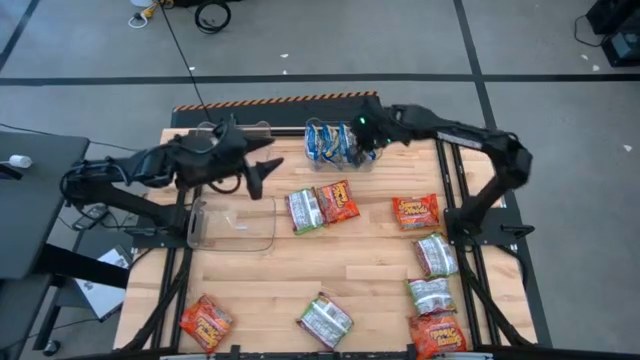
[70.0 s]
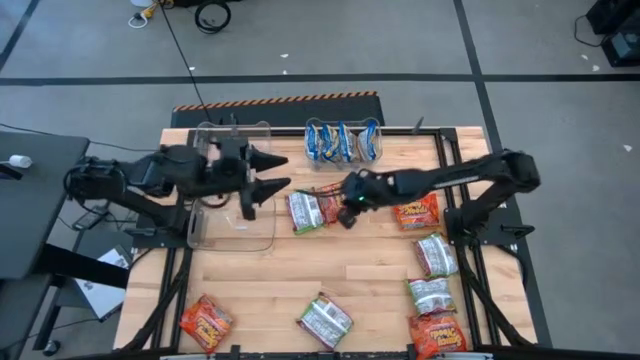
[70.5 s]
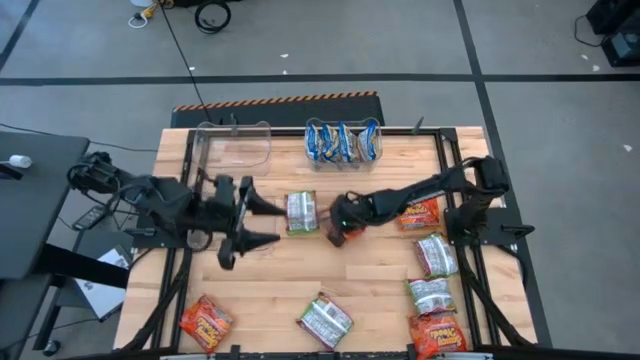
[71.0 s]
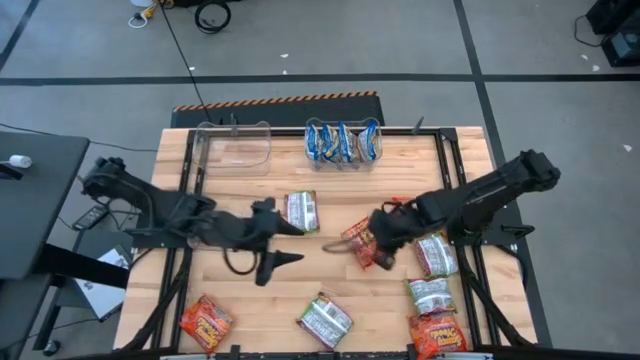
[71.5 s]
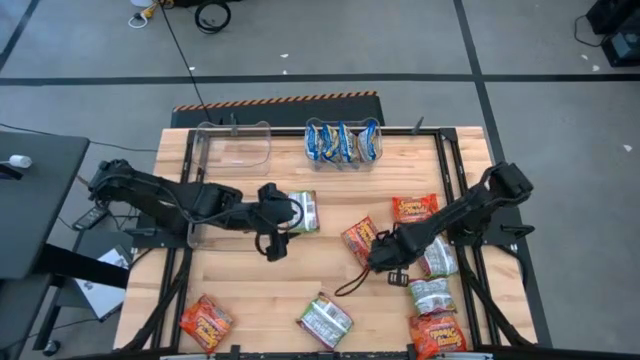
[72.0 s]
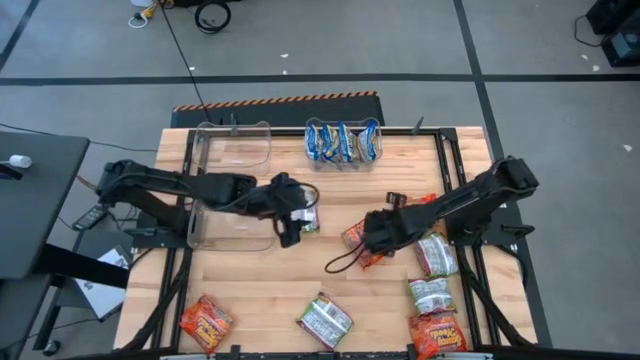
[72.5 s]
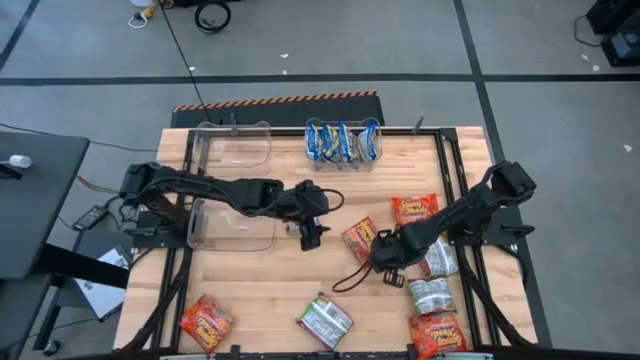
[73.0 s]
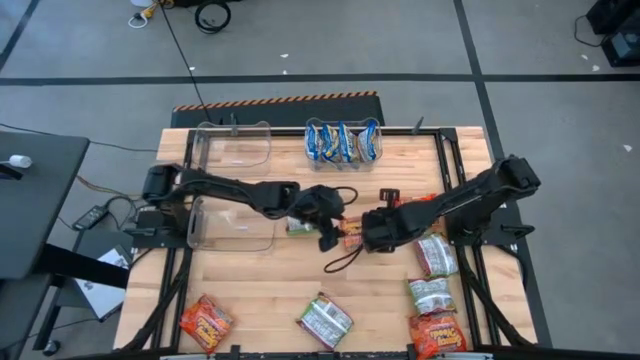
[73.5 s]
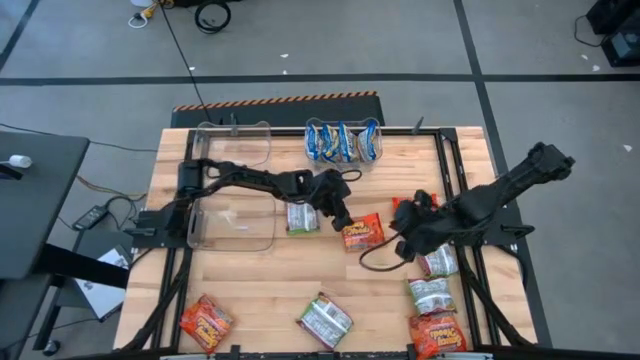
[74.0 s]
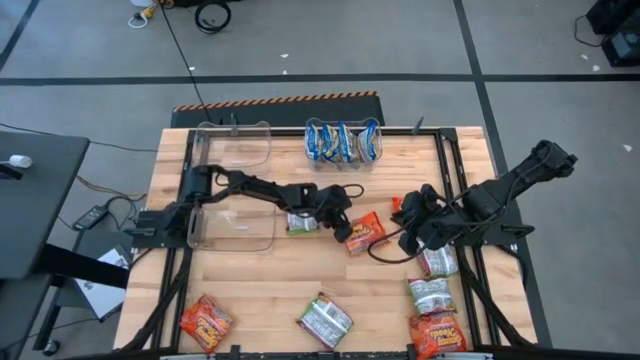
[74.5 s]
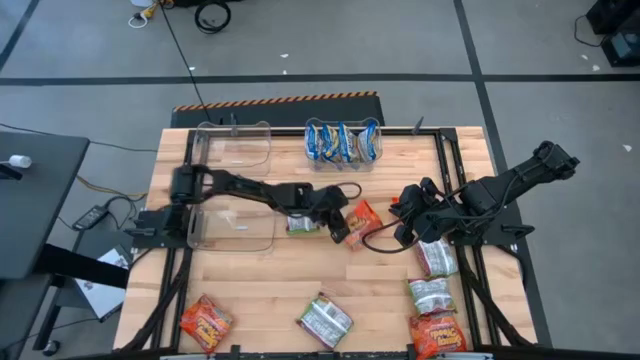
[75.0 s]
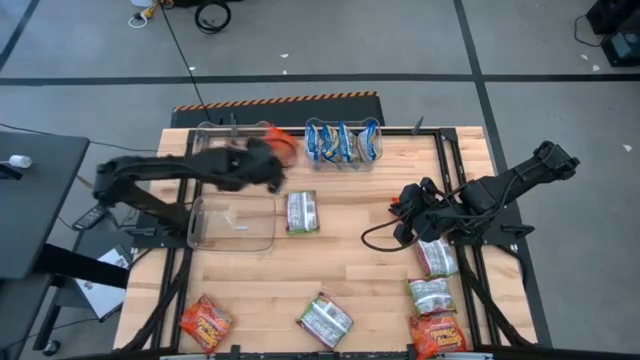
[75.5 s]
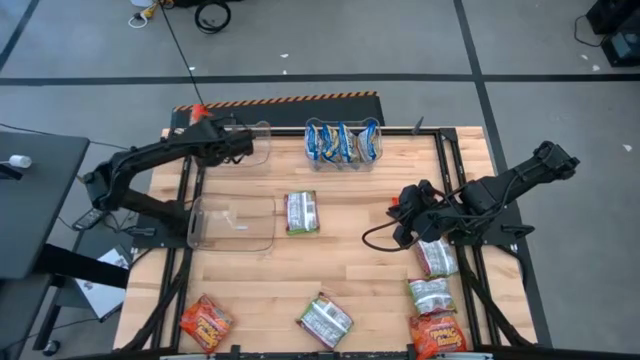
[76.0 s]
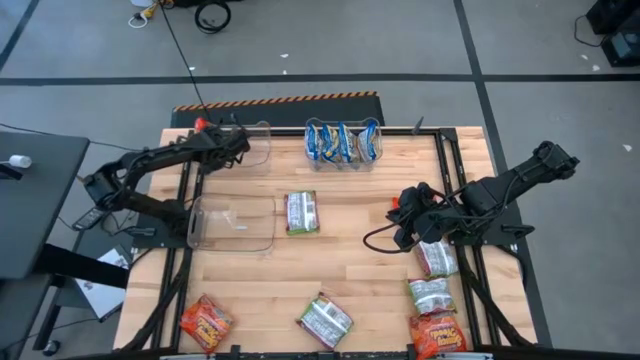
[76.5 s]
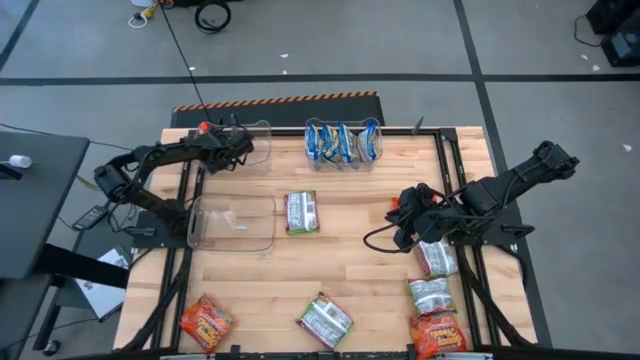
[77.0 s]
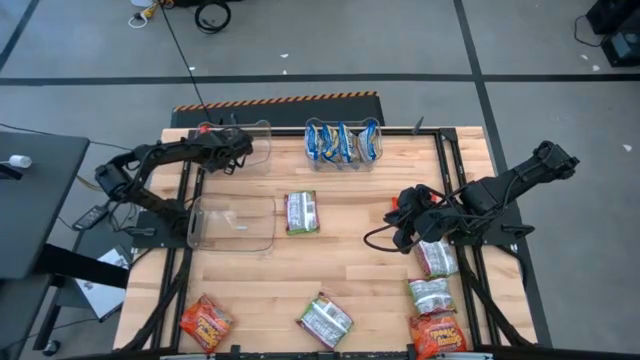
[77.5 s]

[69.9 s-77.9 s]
Task: Sort Maruchan noodles
Put the orange noodle pack into the top left transparent bin

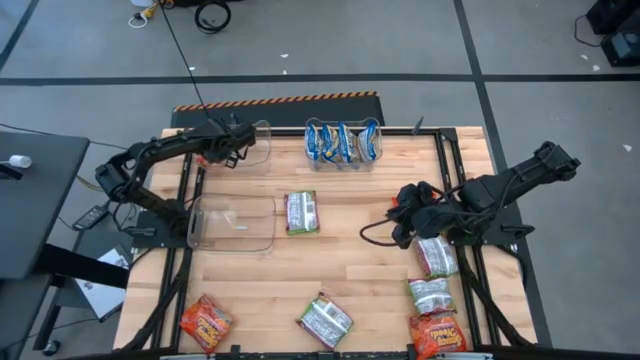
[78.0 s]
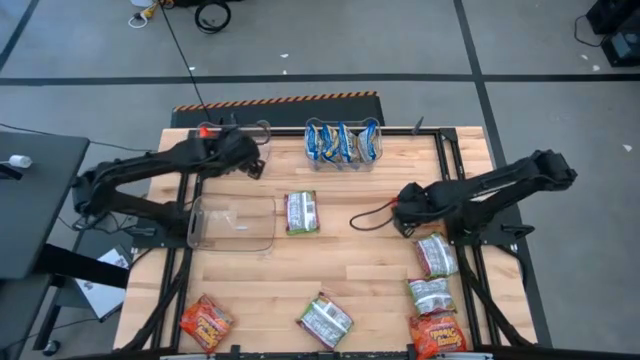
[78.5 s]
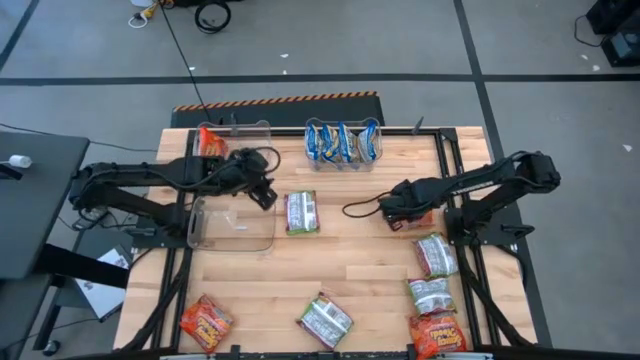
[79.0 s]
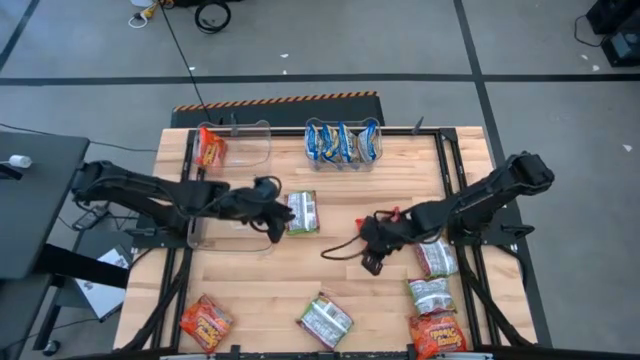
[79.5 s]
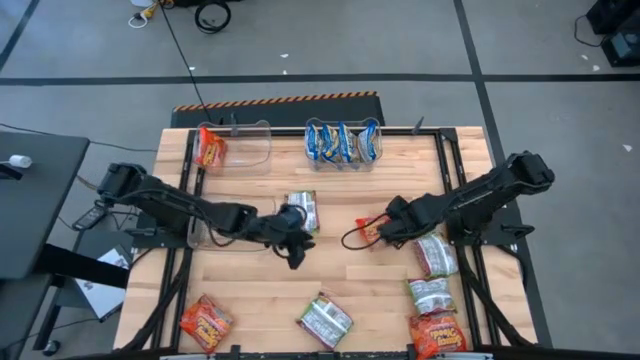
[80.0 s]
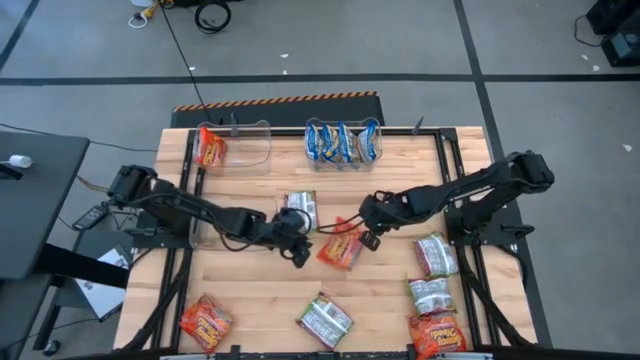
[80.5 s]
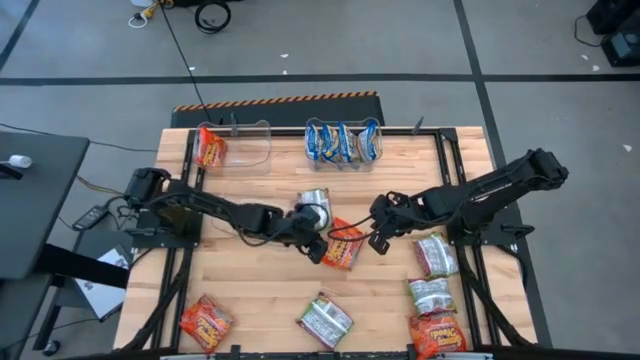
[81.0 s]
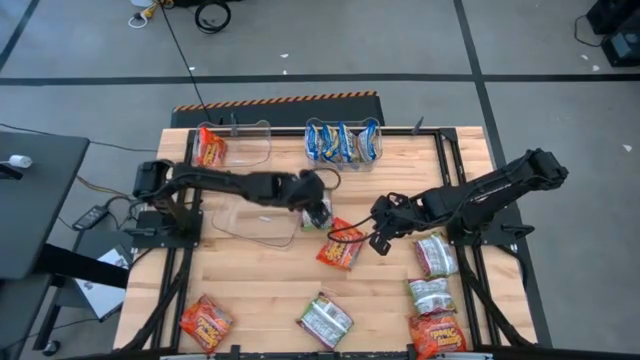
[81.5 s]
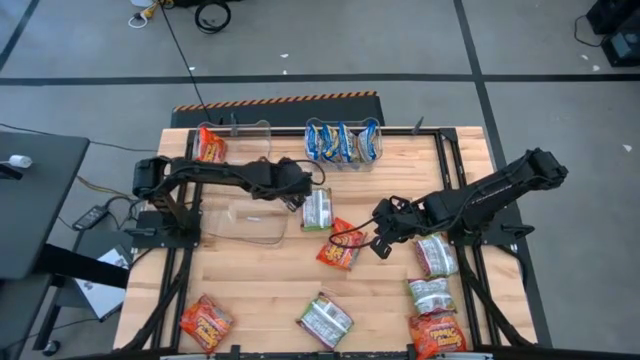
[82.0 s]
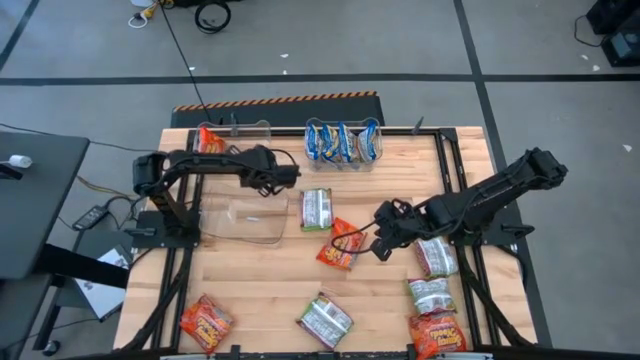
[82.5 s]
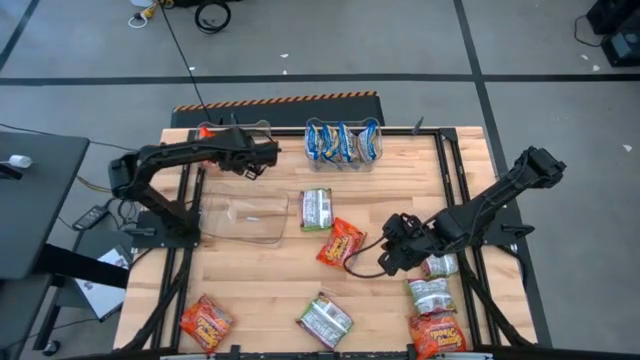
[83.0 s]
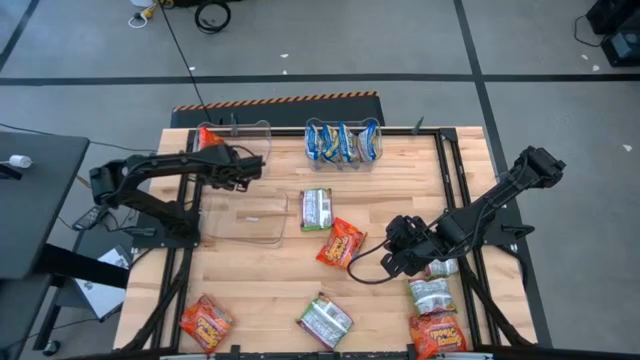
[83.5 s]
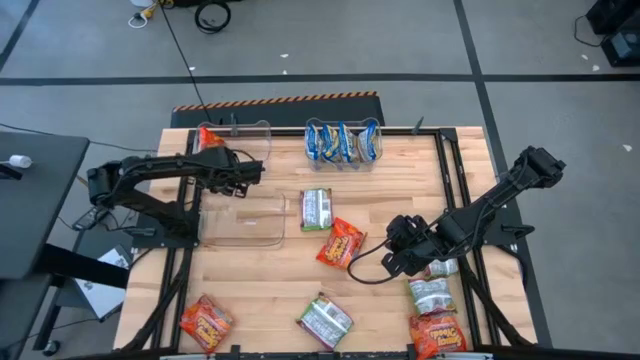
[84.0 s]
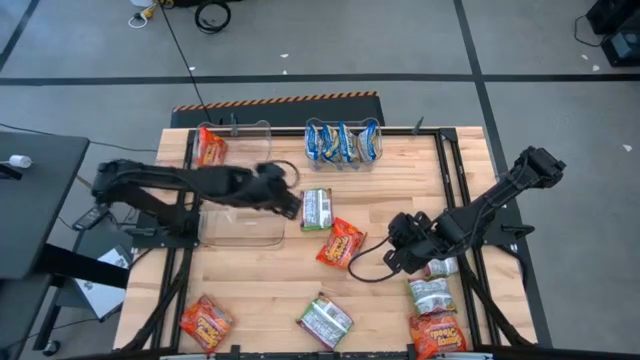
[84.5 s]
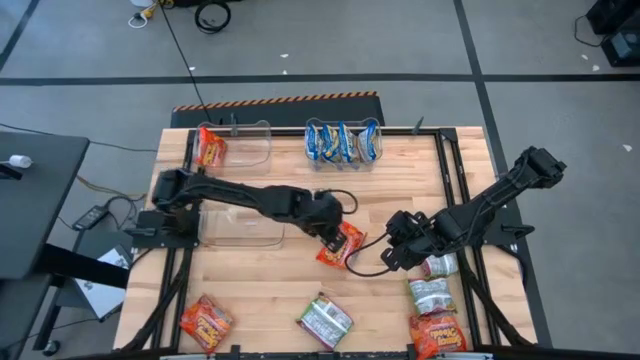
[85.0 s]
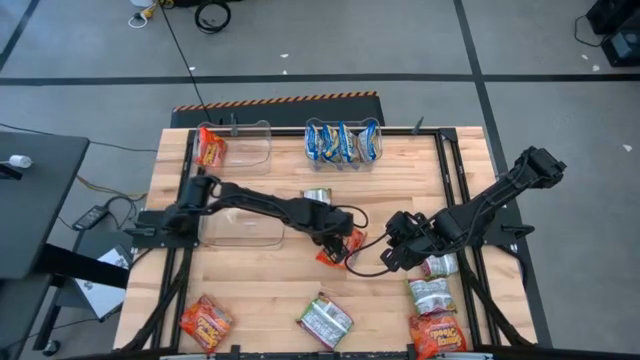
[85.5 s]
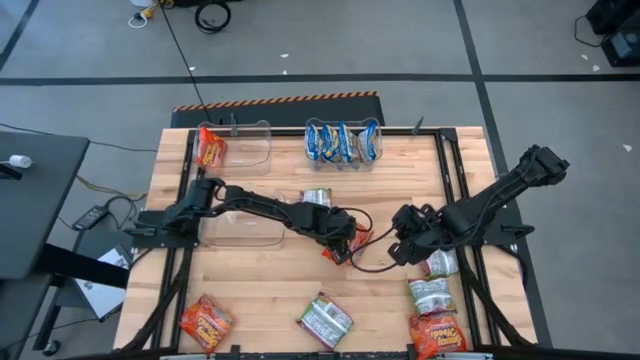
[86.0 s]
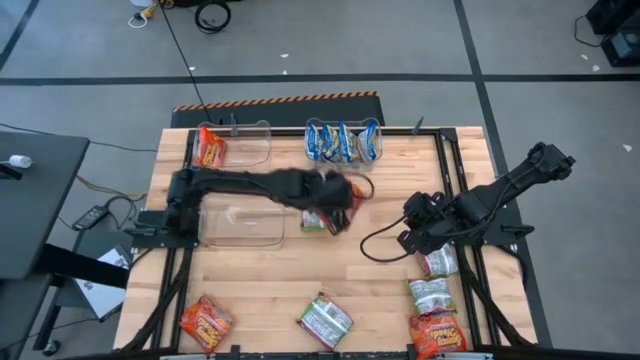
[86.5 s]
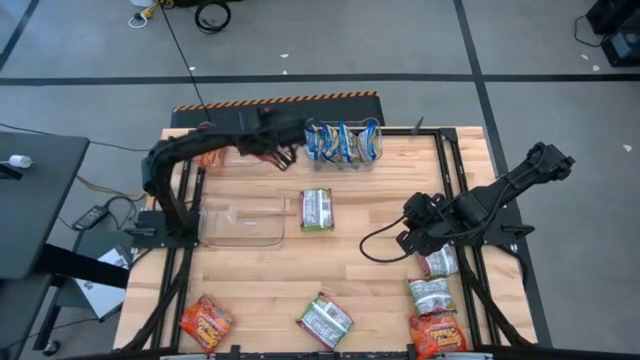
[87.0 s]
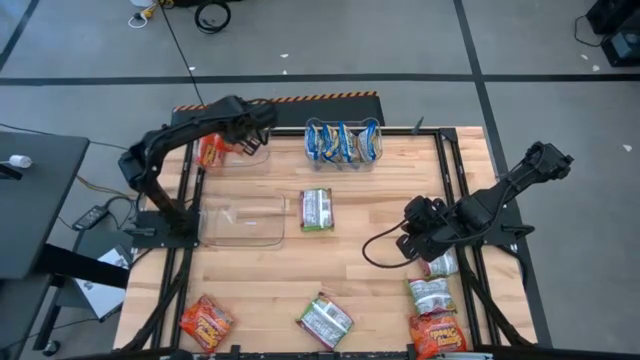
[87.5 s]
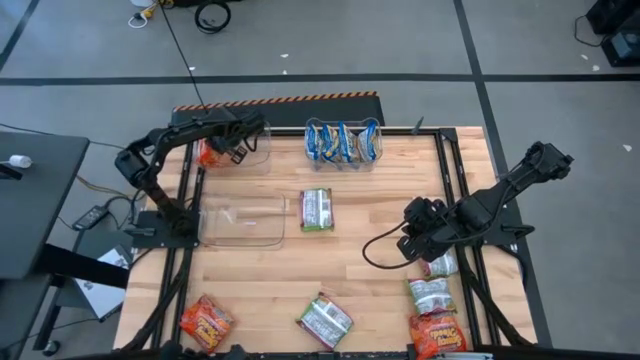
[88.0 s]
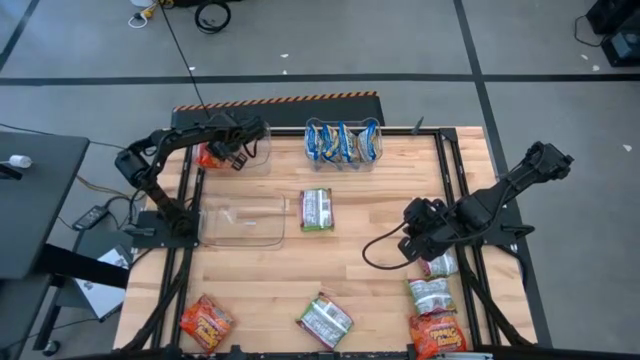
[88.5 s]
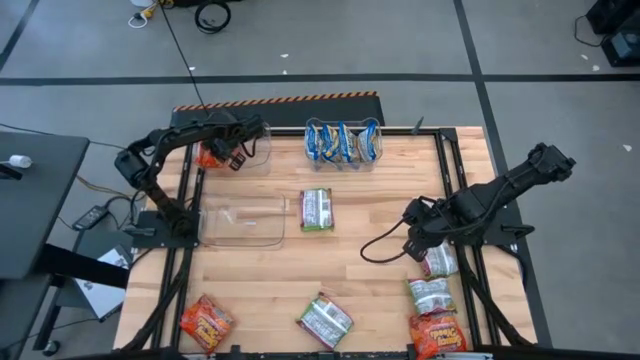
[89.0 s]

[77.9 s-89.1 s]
Put the orange noodle pack into the top left transparent bin

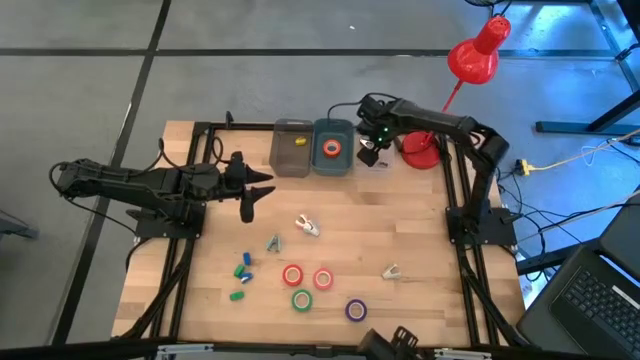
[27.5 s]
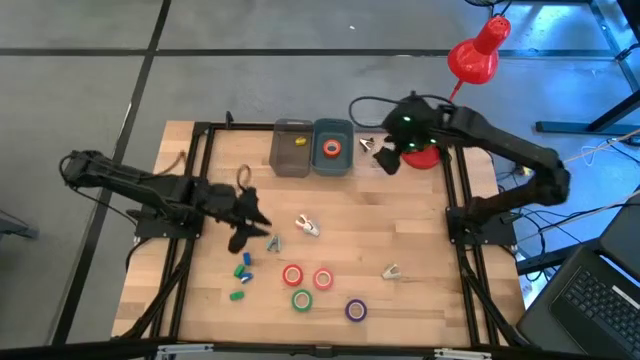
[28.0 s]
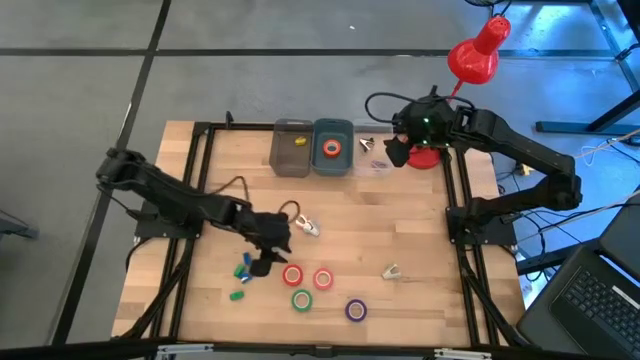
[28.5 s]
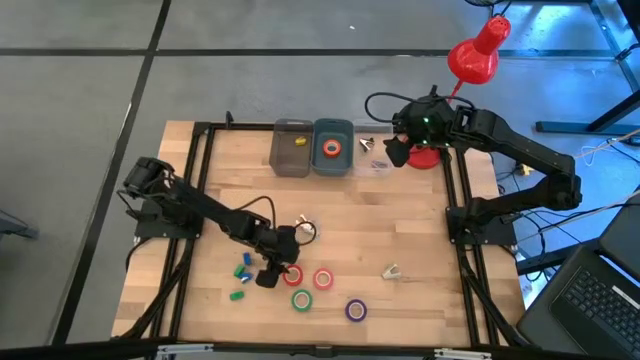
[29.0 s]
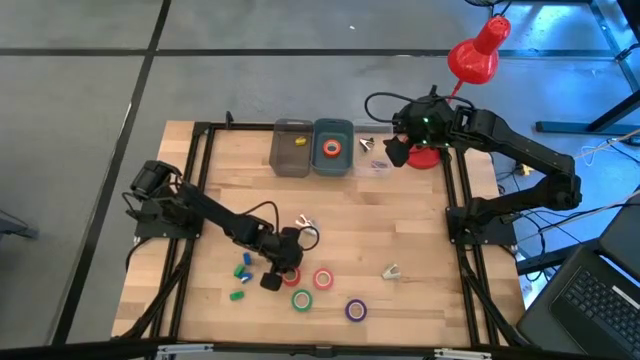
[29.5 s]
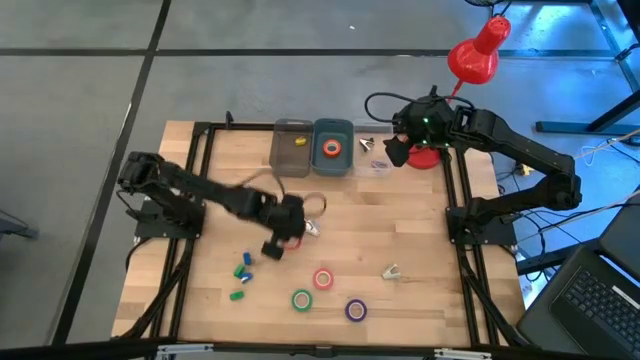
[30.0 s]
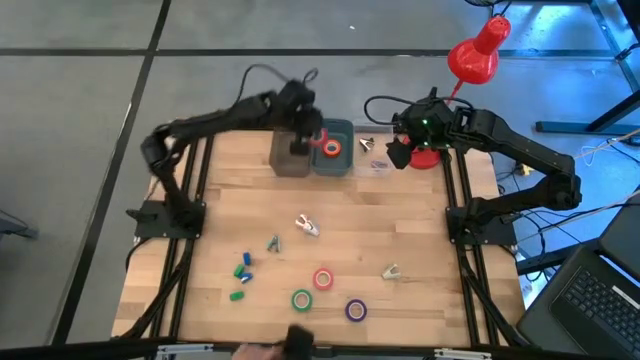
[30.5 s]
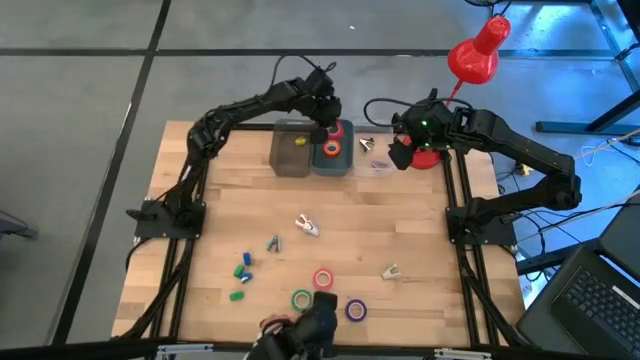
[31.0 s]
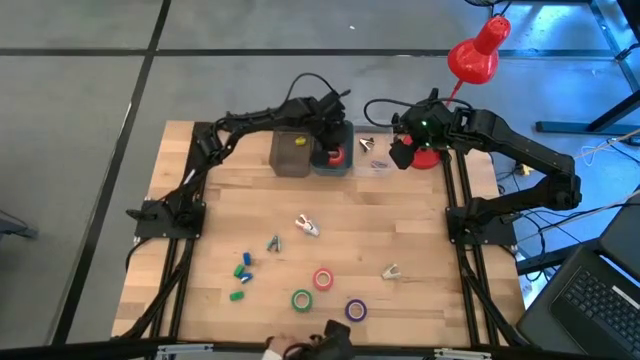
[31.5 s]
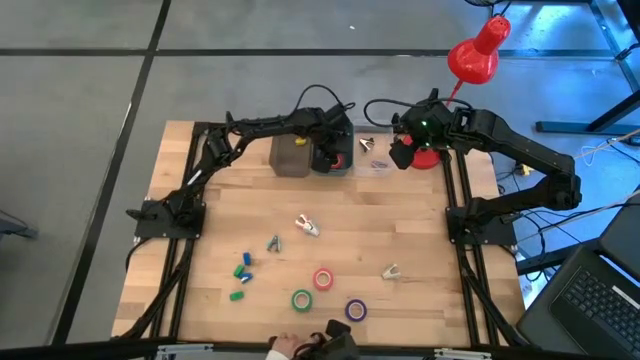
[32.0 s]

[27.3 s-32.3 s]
Task: Pick and place Stapler, Stapler remover, tape
Put the red tape into the green bin
